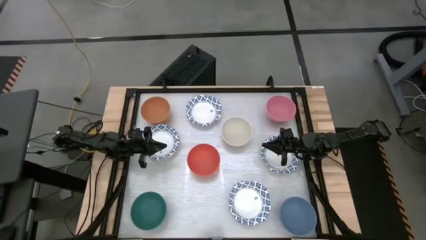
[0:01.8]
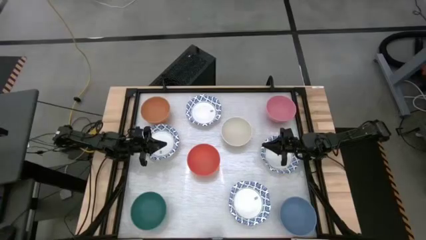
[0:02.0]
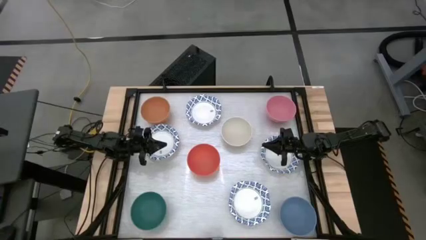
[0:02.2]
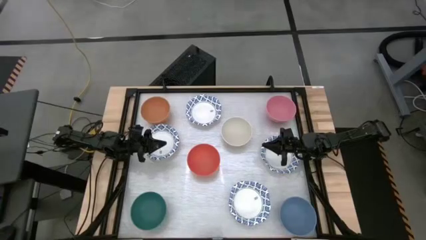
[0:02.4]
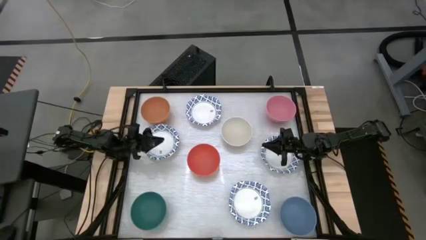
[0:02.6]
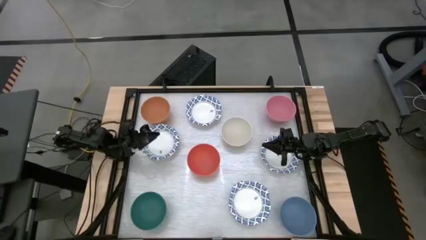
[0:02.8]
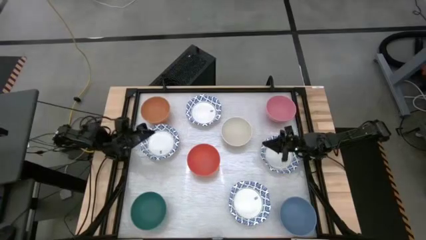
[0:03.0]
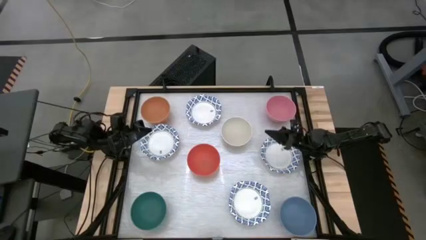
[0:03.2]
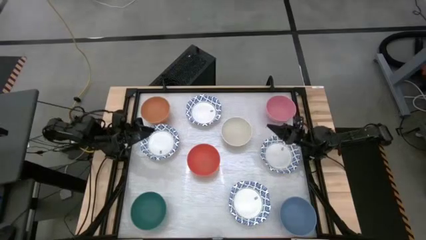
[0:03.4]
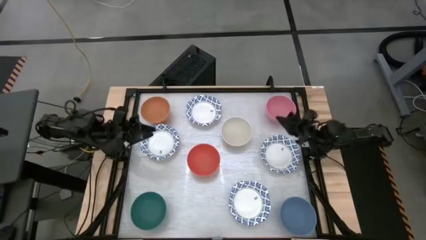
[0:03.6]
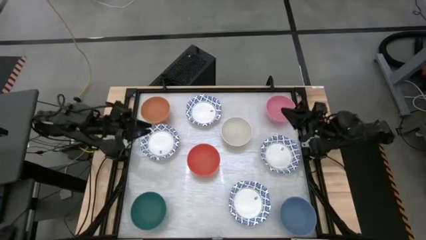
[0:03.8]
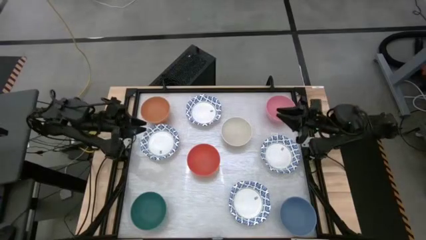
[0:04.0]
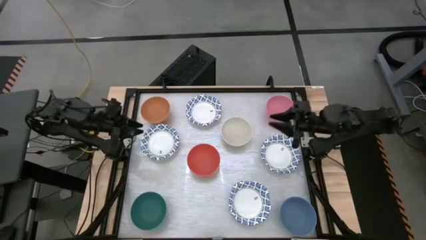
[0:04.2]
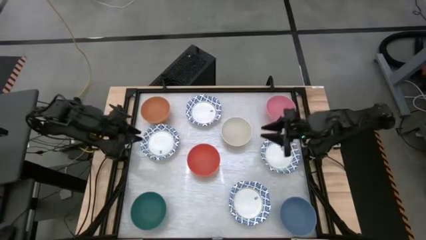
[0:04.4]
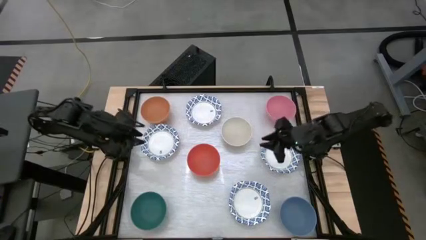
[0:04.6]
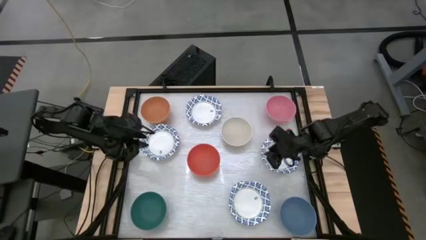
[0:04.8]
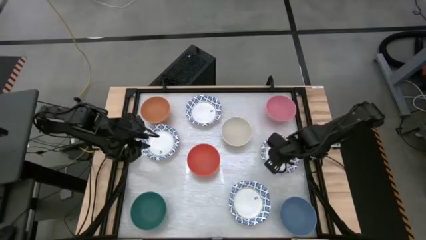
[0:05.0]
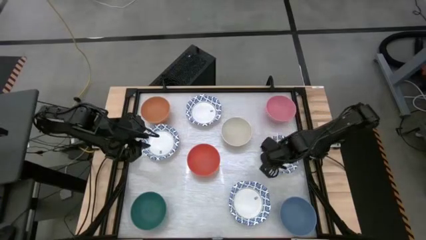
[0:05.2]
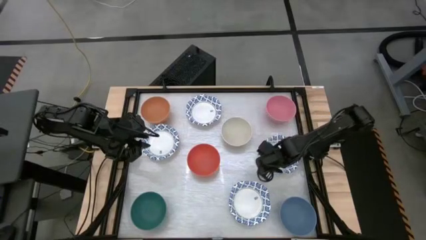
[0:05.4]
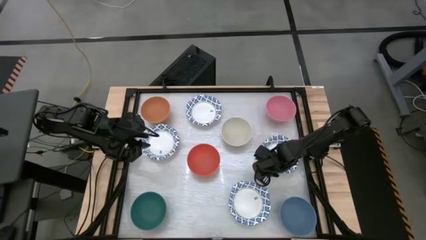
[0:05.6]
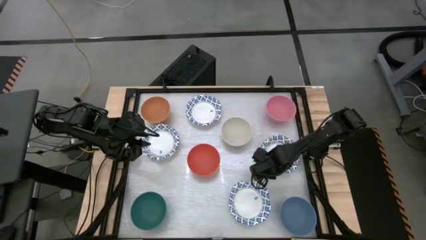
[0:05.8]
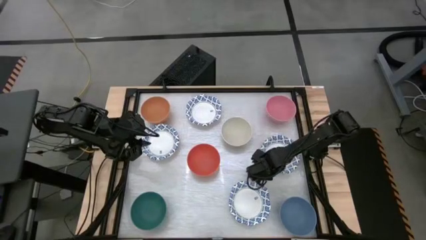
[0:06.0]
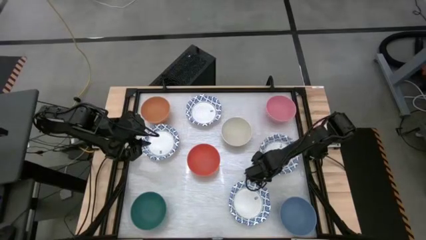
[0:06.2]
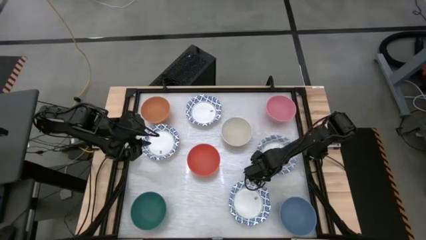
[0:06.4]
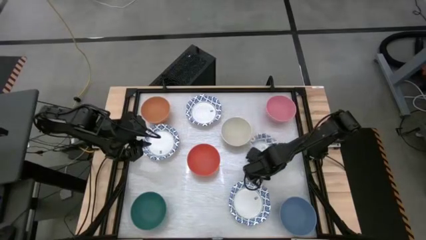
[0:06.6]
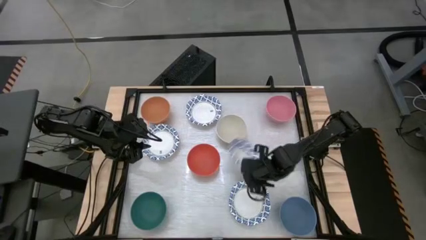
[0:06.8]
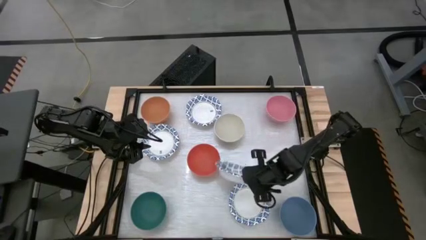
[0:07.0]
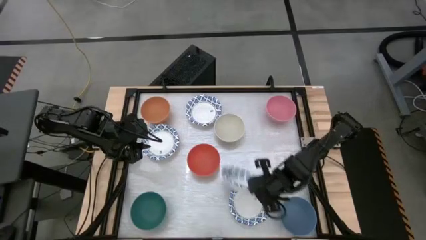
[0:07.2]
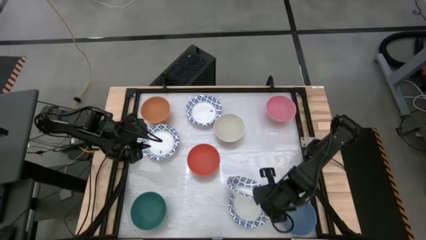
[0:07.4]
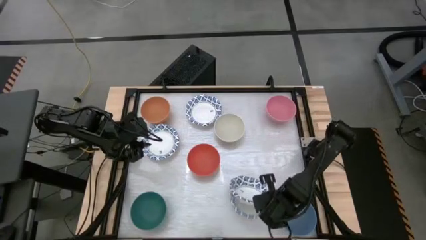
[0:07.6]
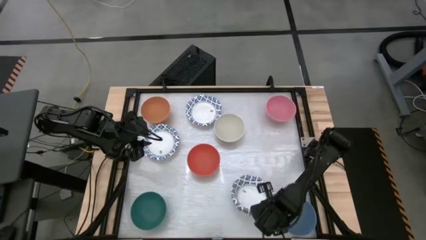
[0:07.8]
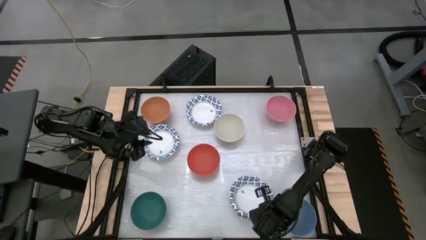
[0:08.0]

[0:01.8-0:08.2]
Stack the white patterned bowl on top of the white patterned bowl

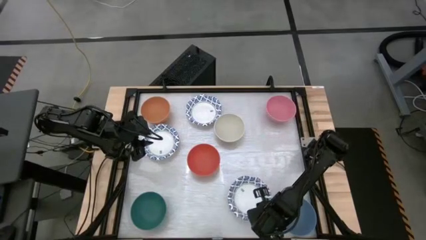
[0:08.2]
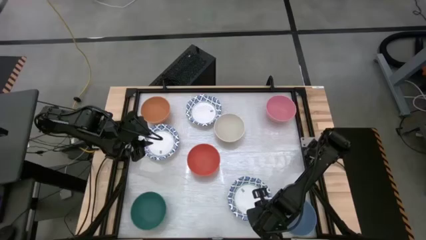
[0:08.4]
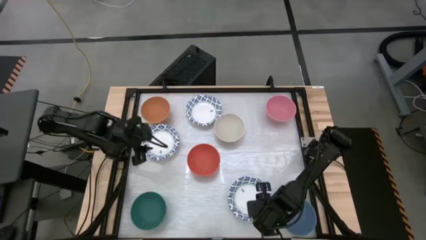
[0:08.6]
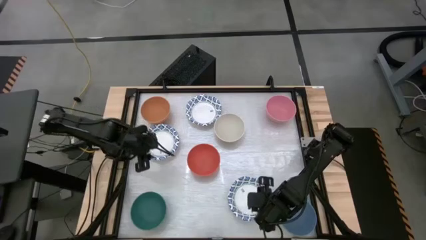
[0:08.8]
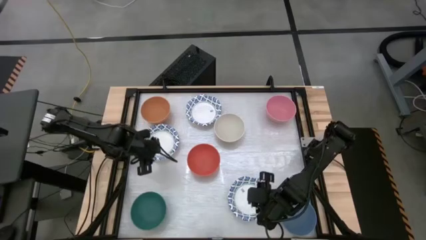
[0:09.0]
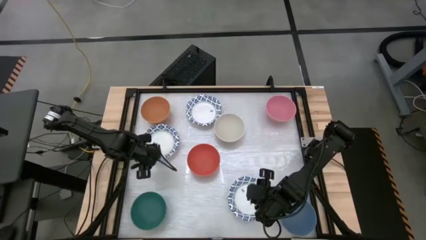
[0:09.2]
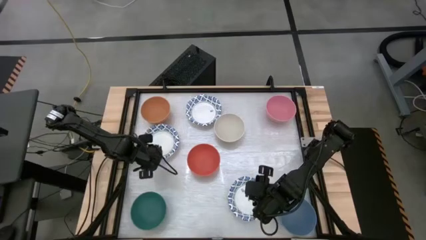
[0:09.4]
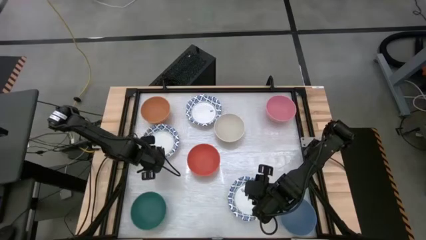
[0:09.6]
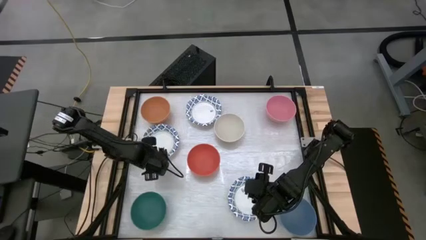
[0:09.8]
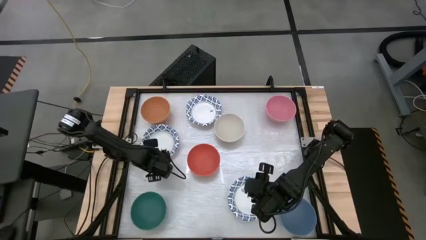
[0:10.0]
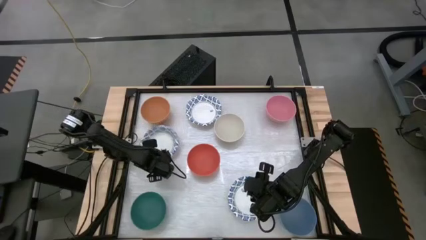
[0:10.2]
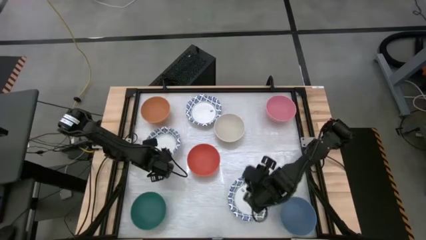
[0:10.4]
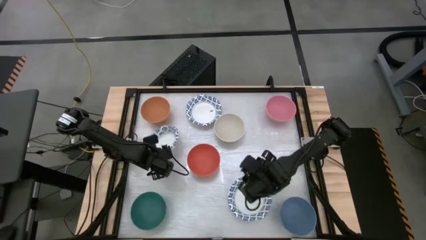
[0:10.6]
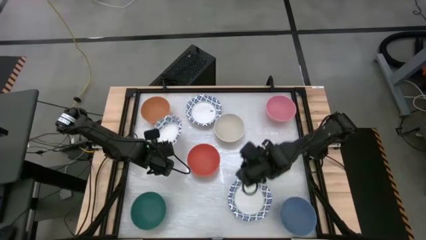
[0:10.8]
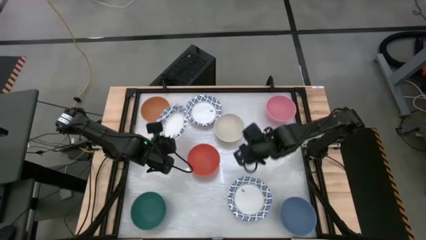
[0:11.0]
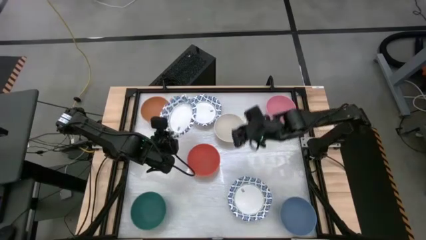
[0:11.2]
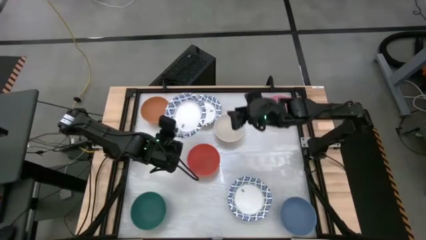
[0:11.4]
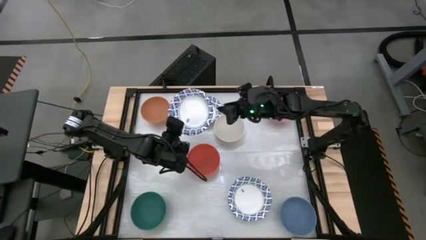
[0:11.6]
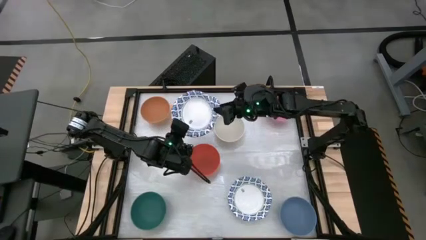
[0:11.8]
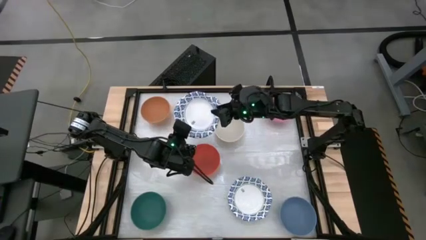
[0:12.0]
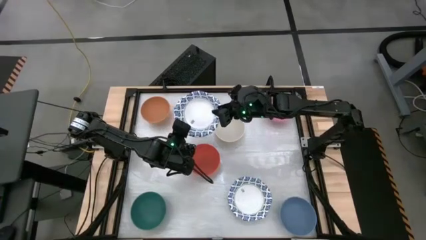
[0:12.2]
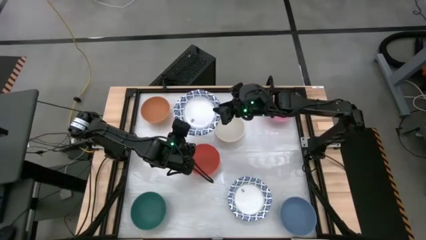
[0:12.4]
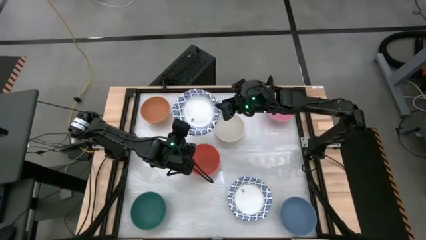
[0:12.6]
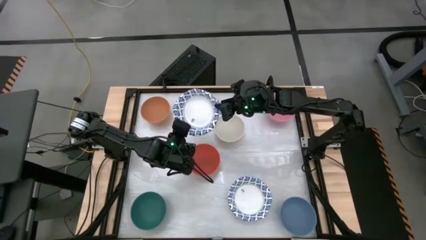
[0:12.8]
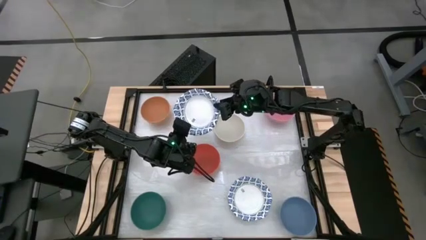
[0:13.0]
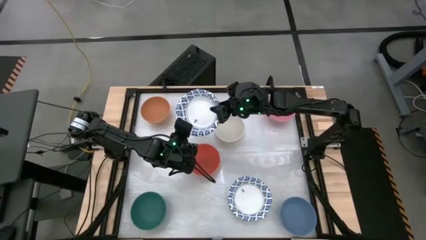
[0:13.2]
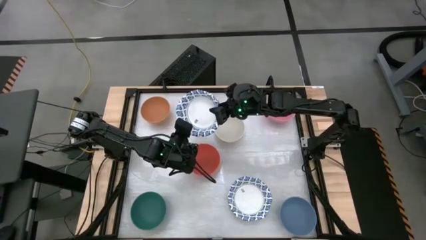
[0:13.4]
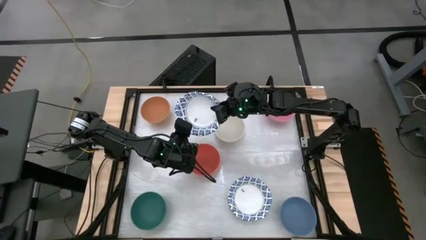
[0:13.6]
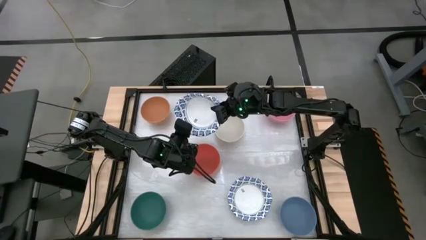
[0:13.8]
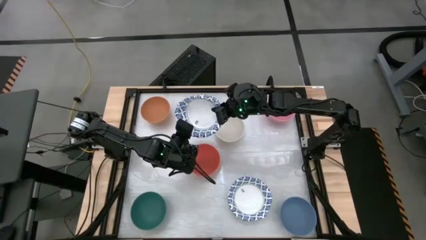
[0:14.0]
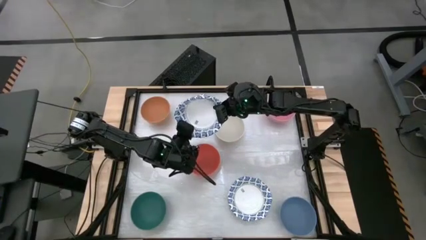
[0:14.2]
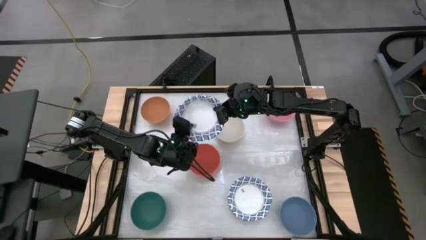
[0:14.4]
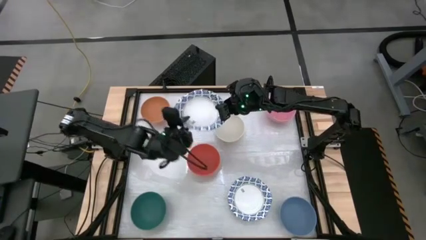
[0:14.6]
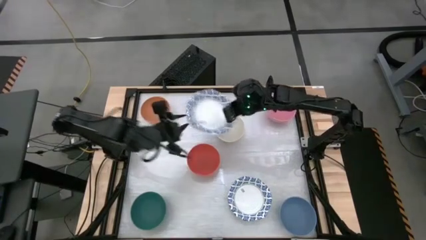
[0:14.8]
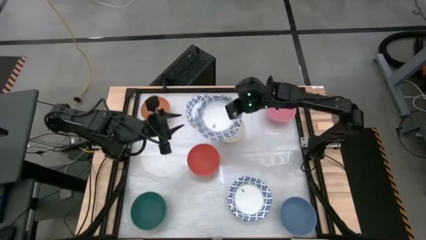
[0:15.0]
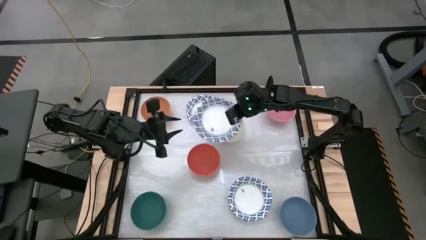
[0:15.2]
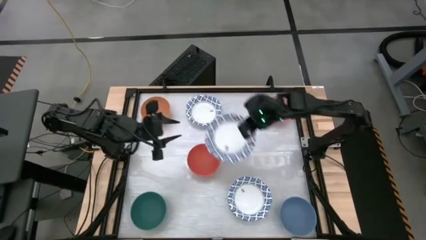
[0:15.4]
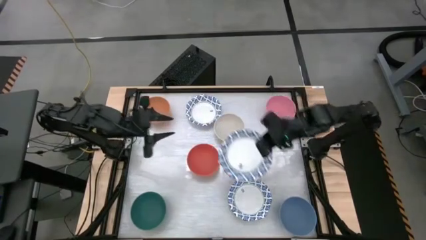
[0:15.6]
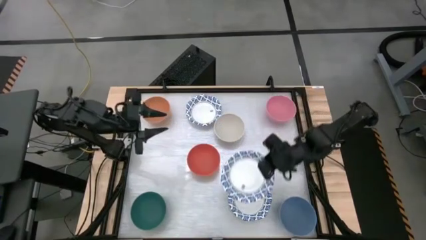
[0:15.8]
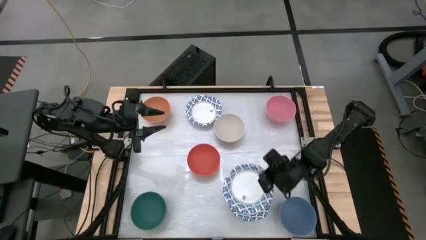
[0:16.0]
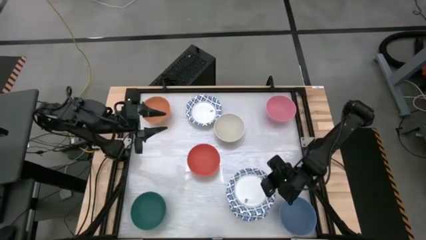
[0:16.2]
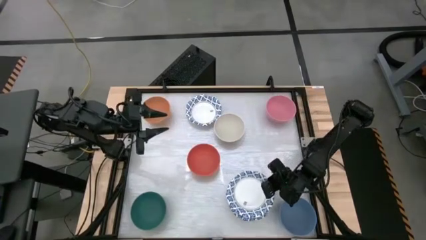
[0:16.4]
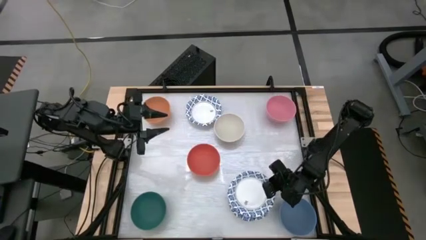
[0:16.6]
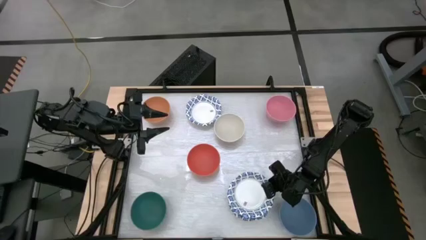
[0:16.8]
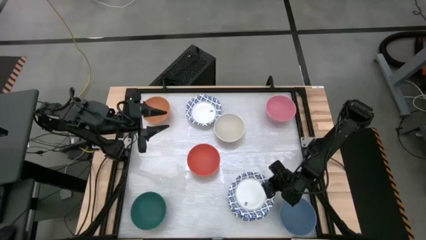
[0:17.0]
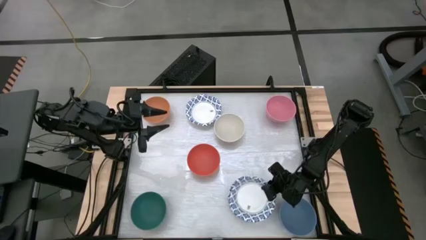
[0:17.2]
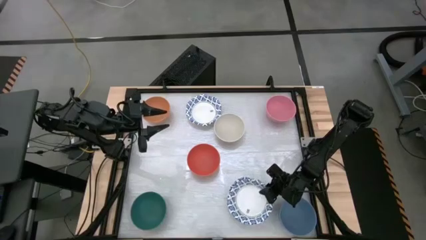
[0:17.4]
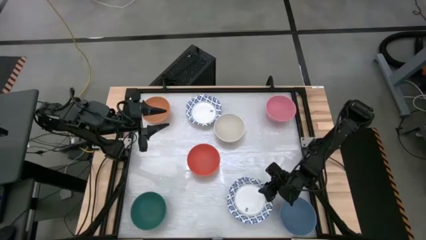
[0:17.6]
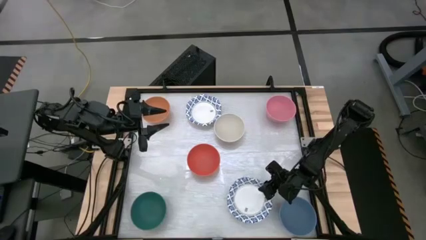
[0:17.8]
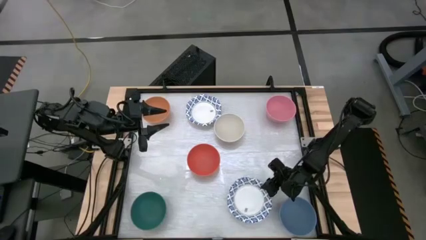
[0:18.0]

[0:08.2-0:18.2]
Stack the white patterned bowl on top of the white patterned bowl
